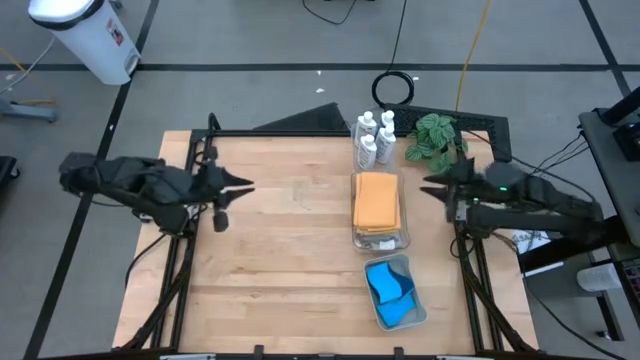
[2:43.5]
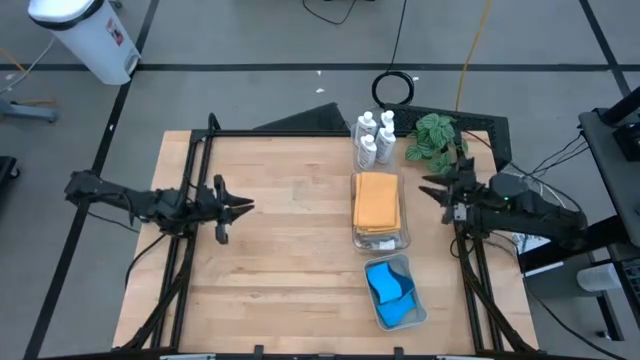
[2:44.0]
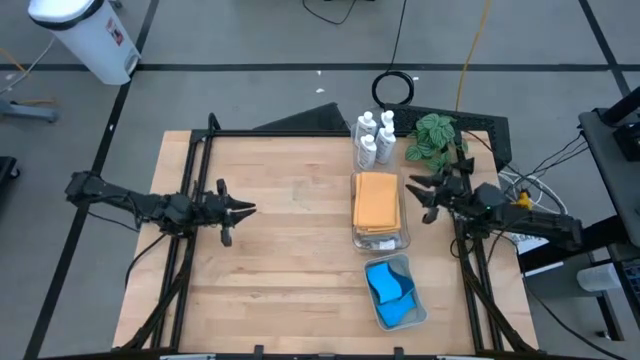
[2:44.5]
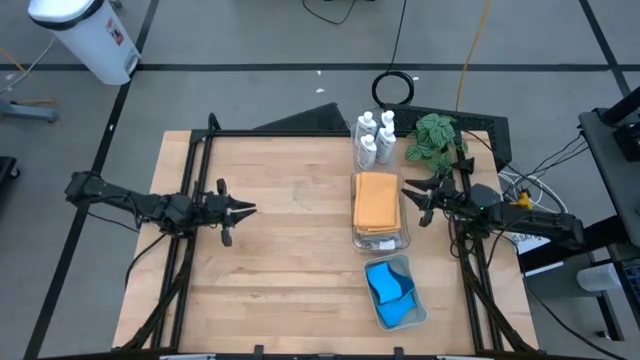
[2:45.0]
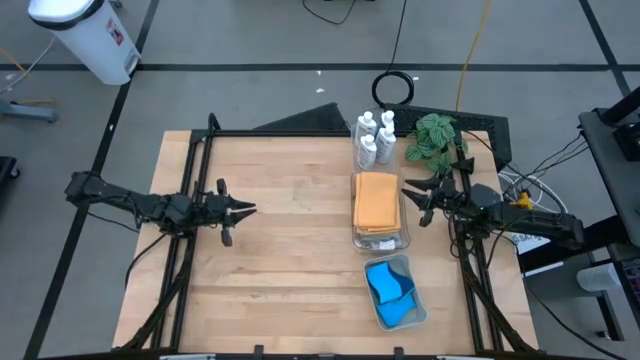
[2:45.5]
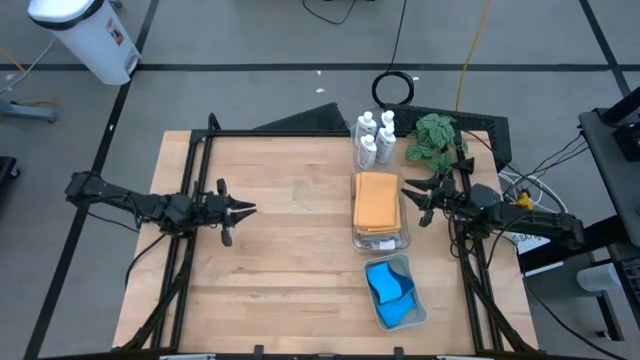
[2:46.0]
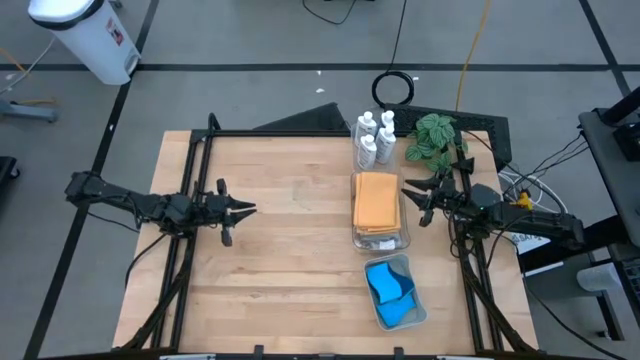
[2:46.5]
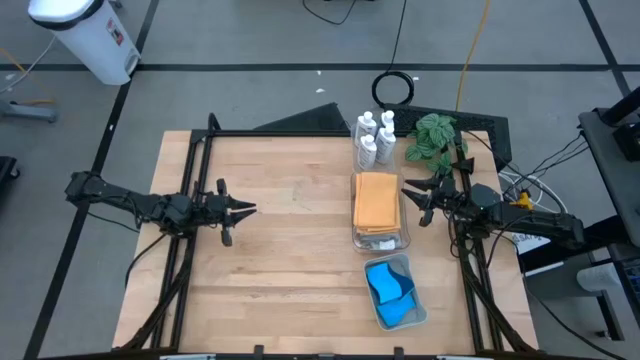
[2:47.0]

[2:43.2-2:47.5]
Task: Pick & Place Kitchen Items
Return to Home Position

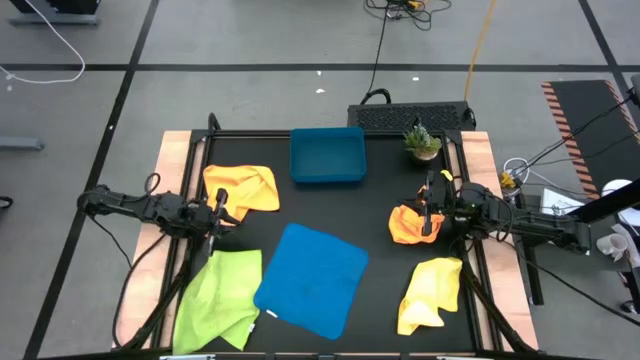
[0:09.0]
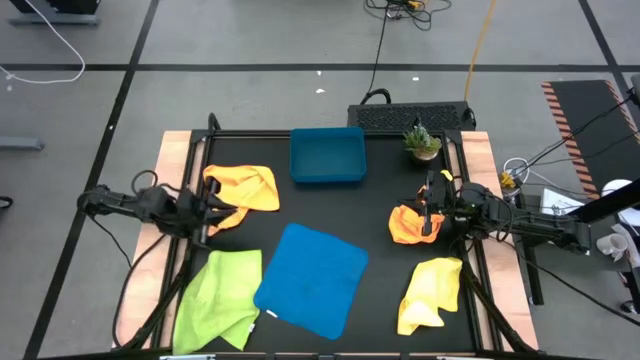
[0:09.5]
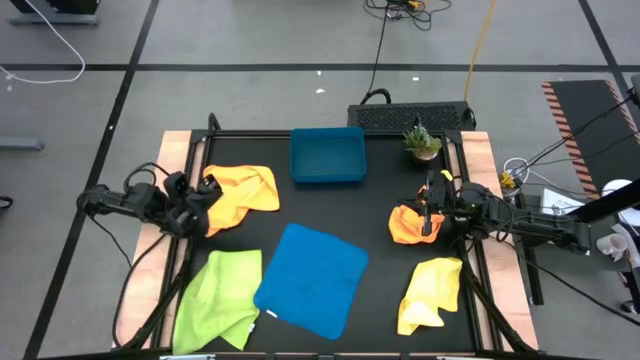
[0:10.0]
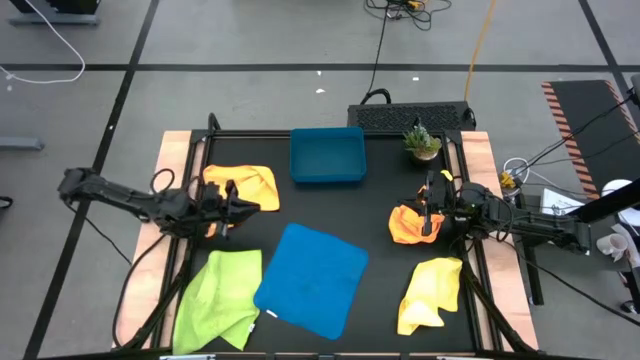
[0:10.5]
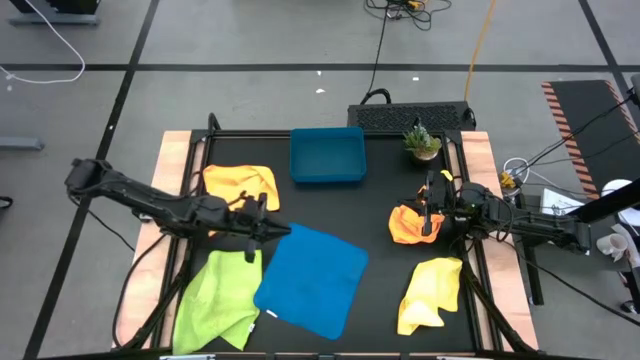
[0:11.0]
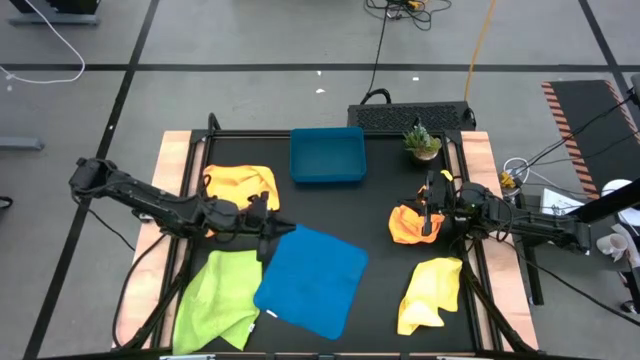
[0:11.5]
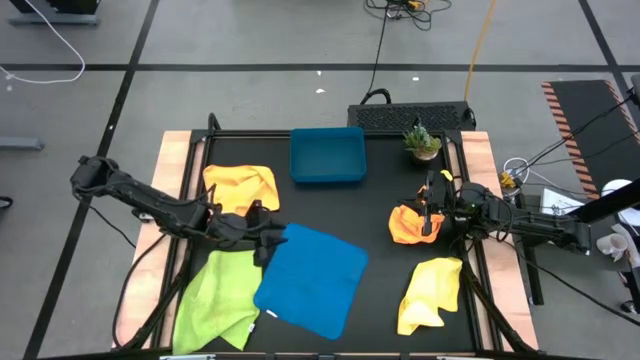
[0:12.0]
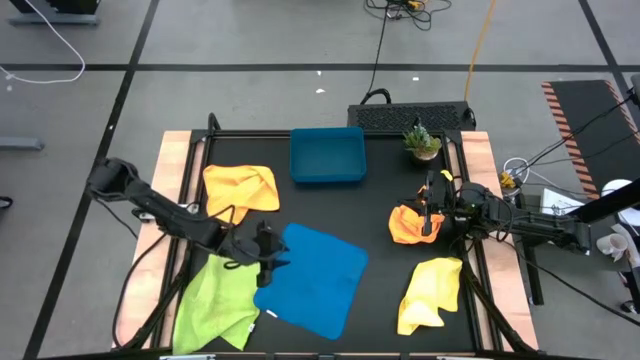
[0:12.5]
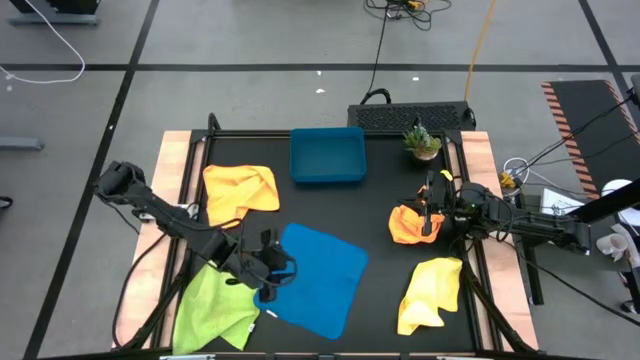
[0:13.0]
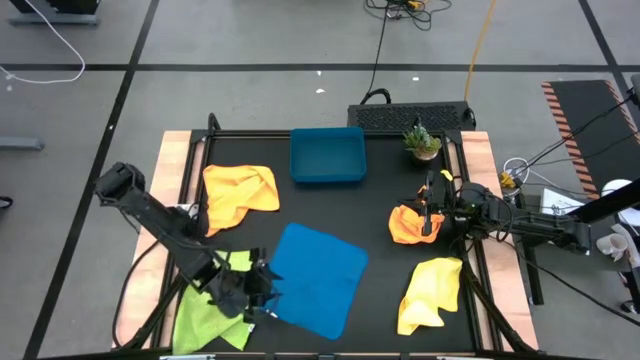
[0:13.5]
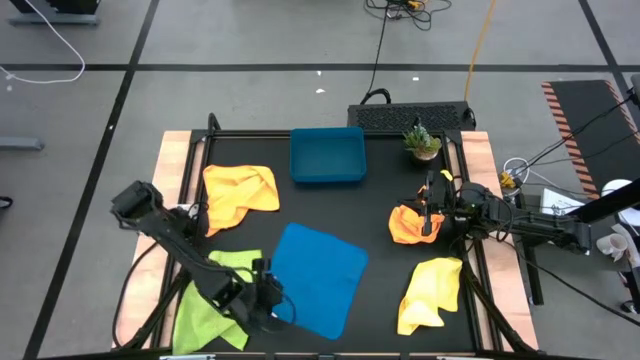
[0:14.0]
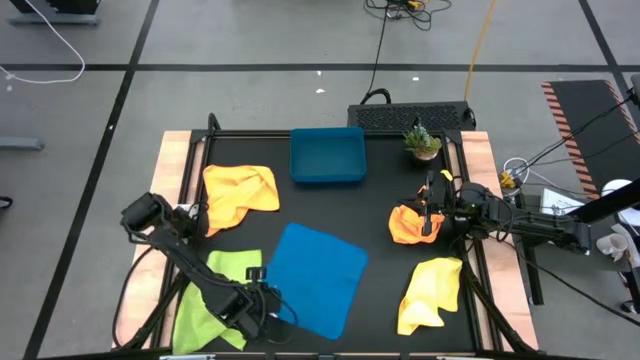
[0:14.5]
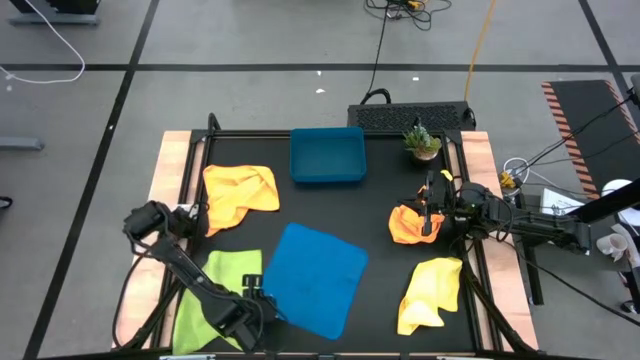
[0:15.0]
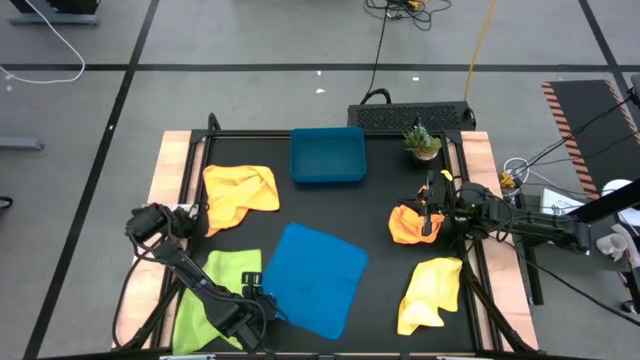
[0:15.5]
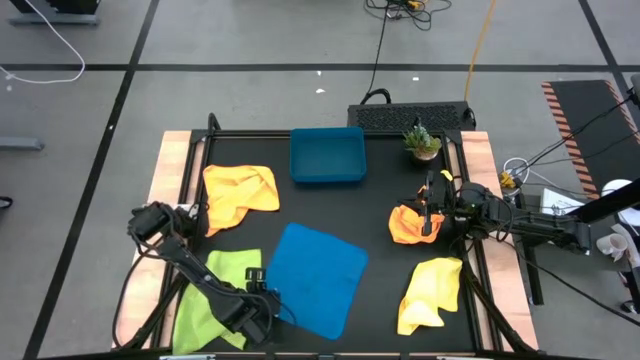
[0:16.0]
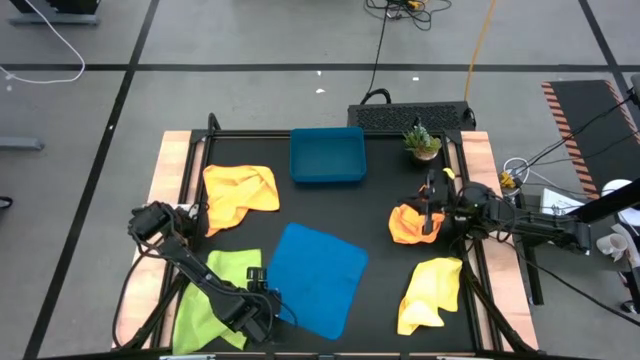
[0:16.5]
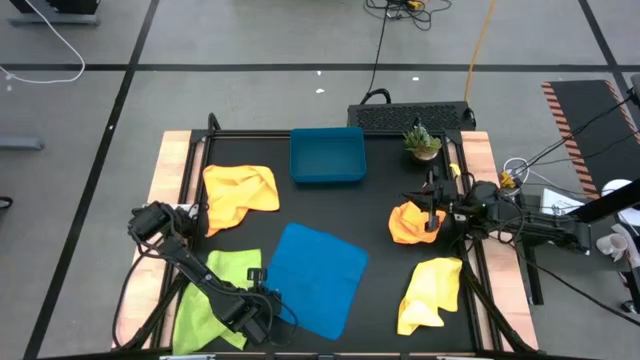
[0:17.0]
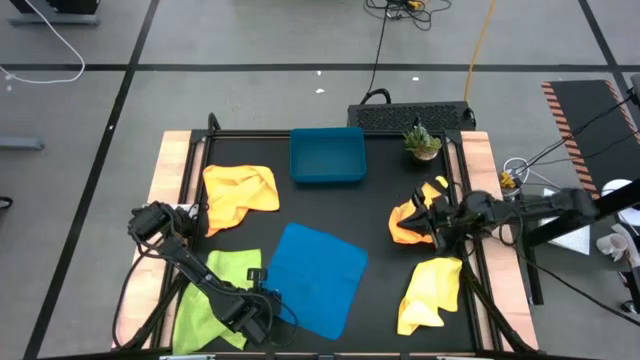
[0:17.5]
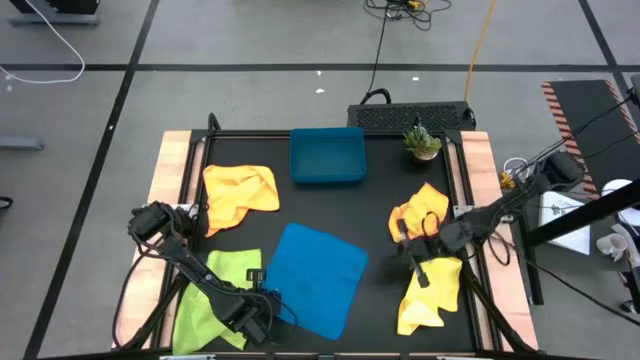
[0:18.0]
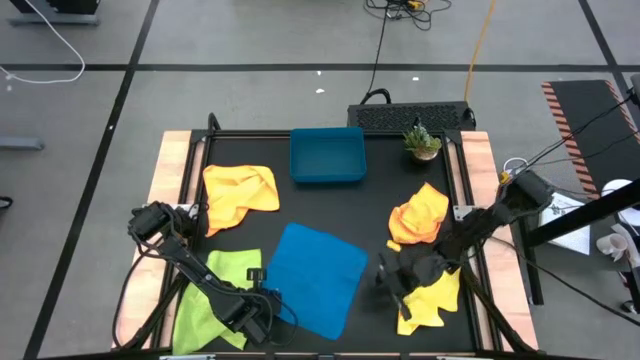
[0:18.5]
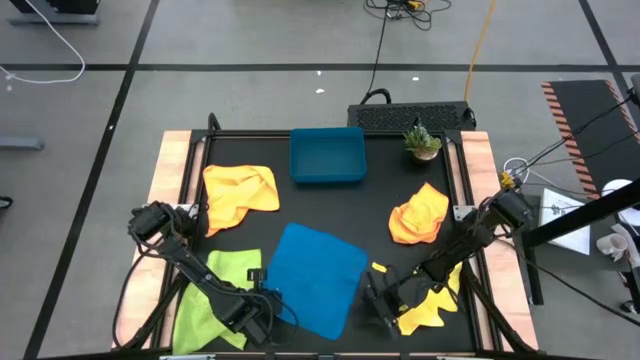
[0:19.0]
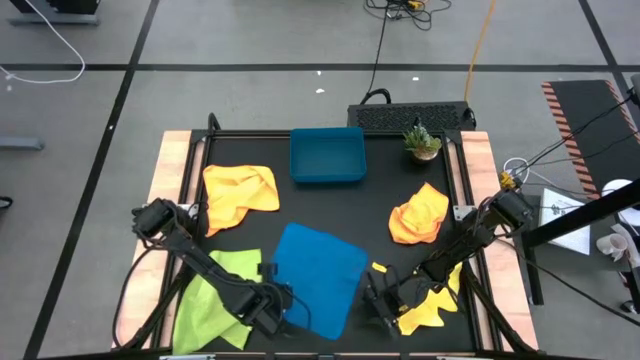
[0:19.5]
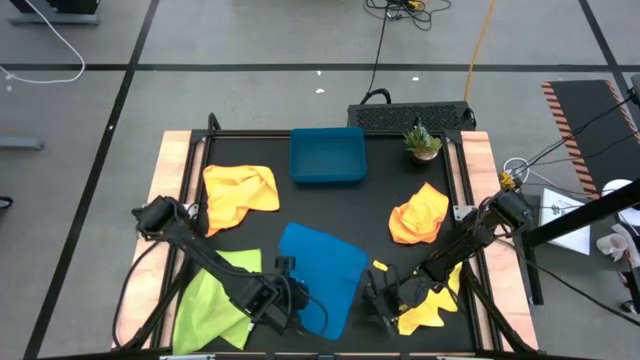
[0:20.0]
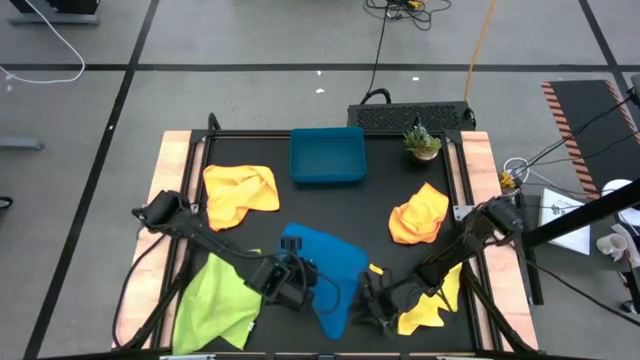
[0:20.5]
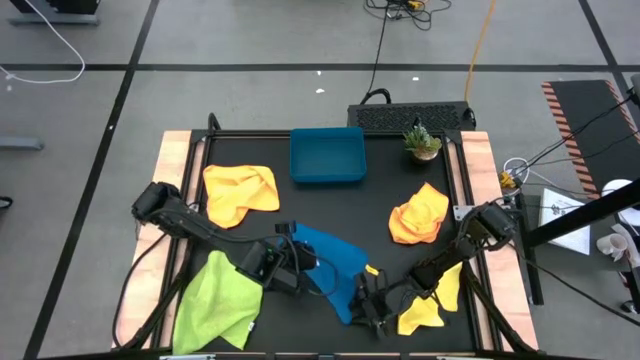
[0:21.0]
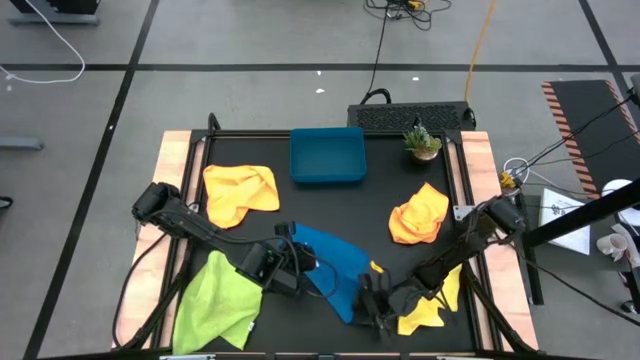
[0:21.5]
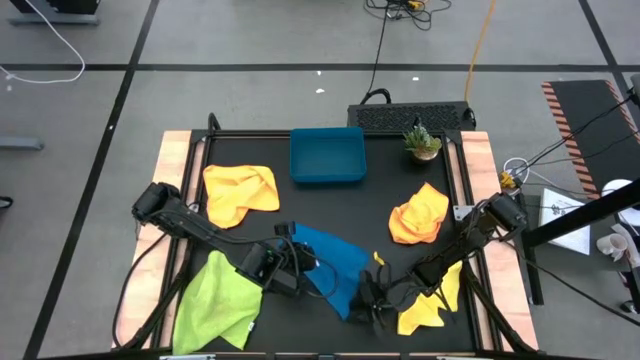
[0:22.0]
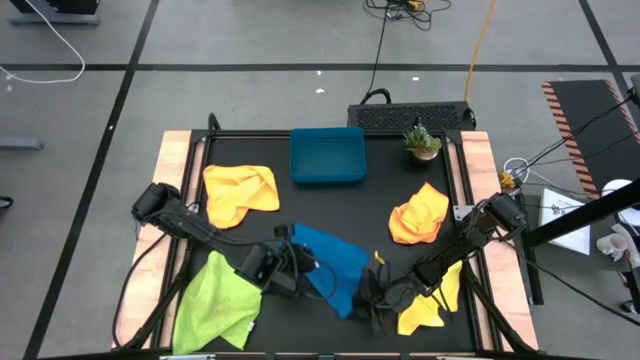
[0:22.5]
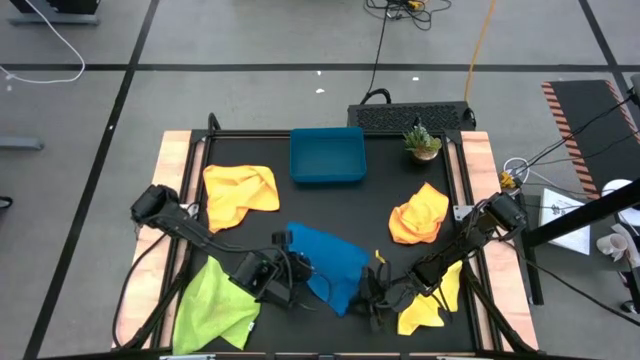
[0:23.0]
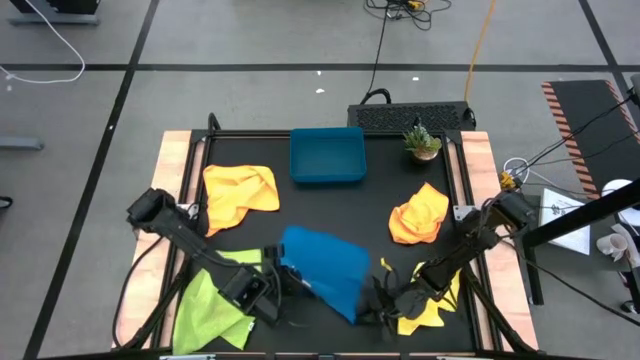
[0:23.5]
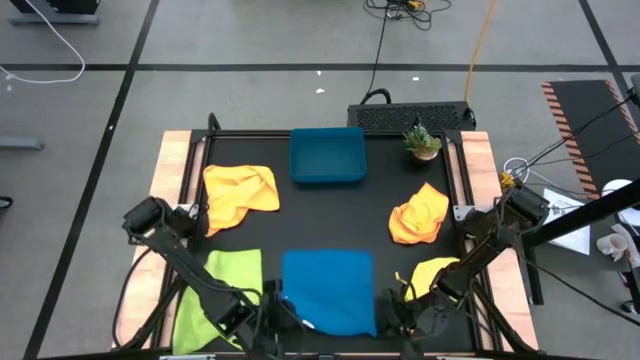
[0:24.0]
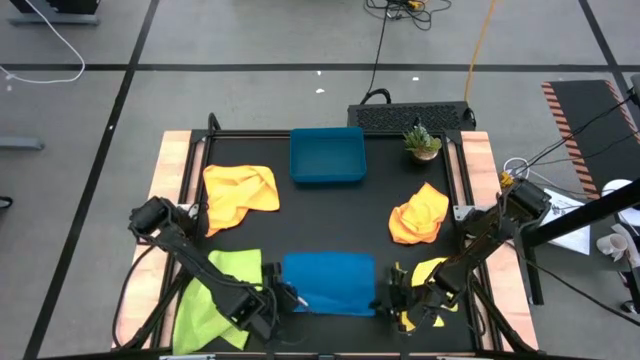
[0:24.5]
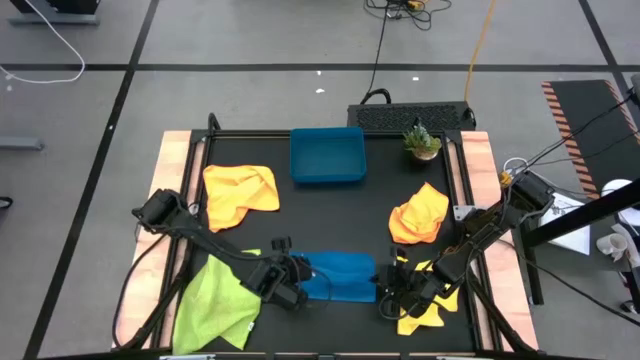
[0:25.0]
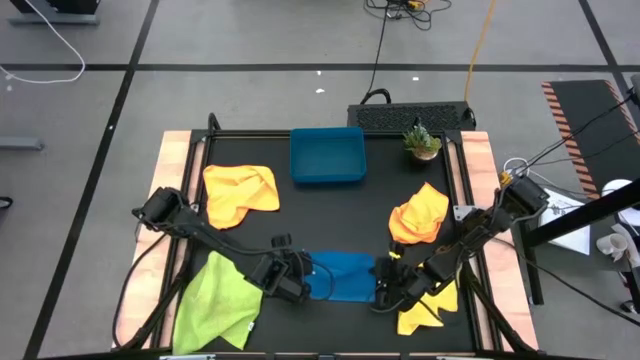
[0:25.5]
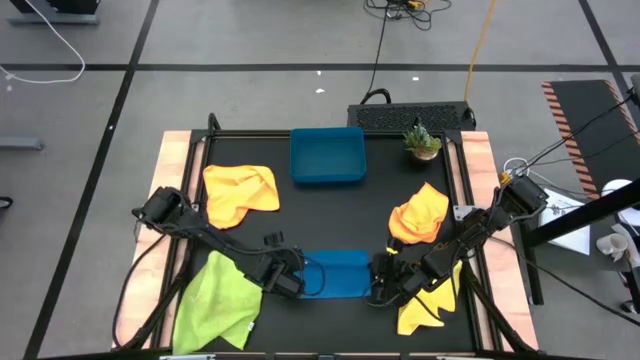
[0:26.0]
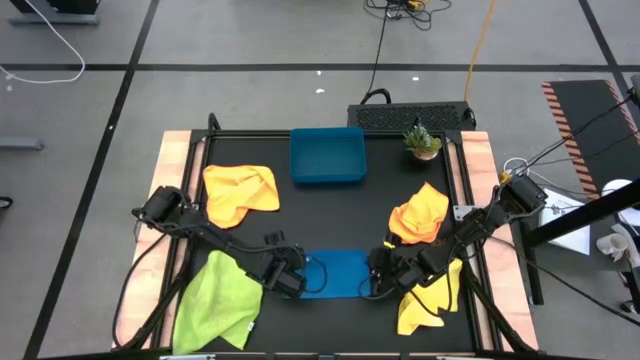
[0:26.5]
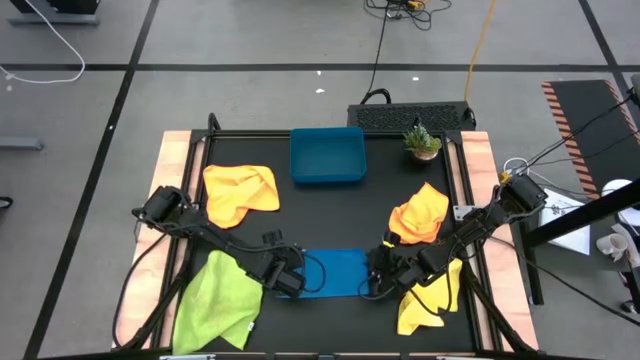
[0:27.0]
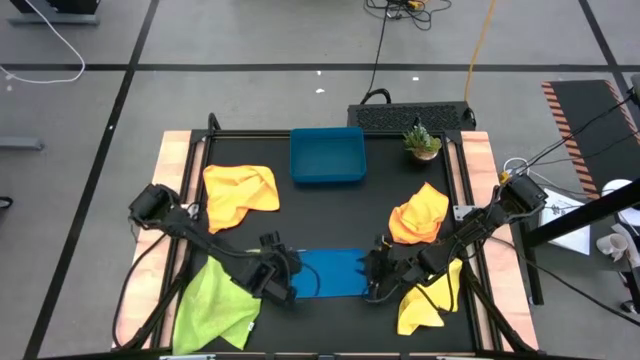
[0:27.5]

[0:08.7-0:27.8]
Task: Fold microfiber towels
Fold the blue microfiber cloth
